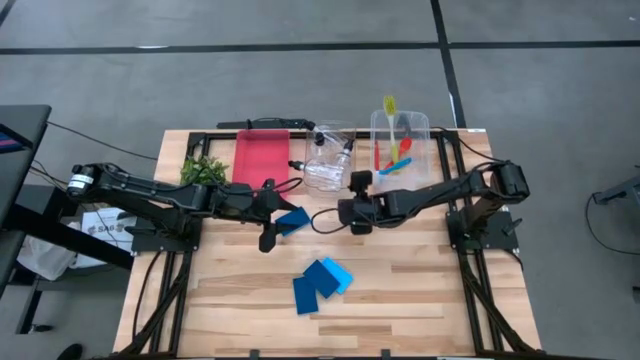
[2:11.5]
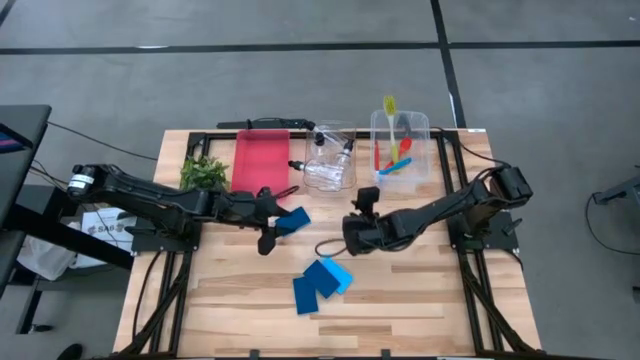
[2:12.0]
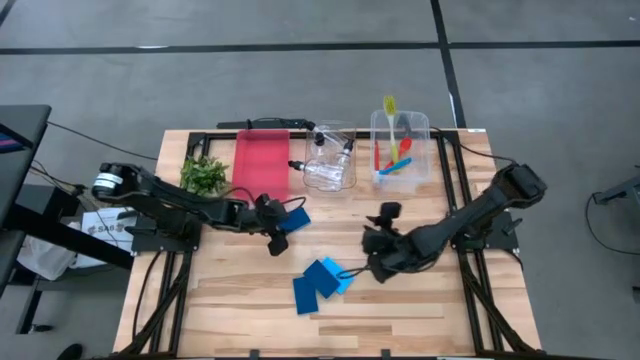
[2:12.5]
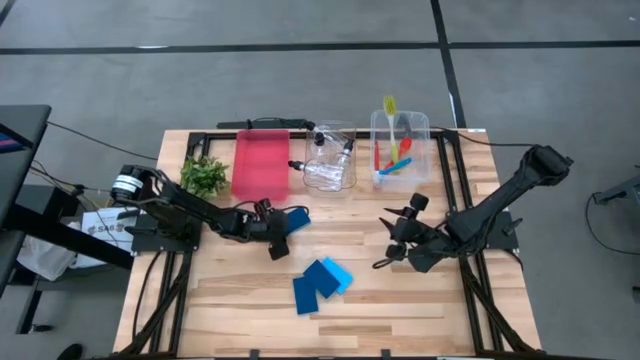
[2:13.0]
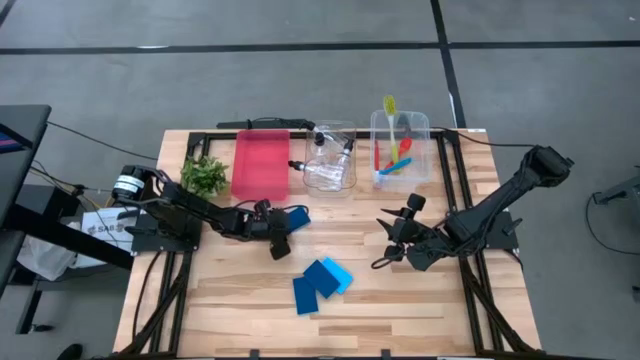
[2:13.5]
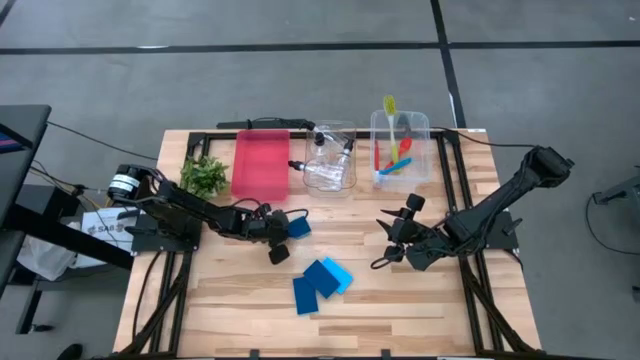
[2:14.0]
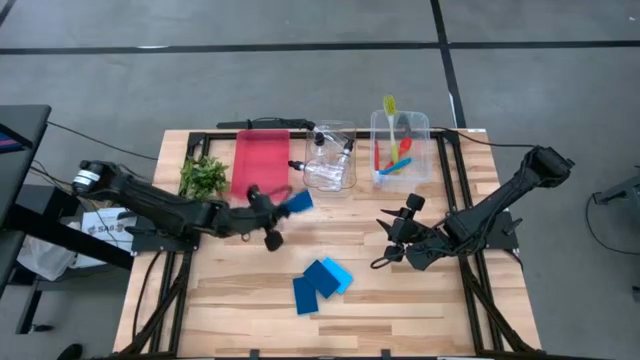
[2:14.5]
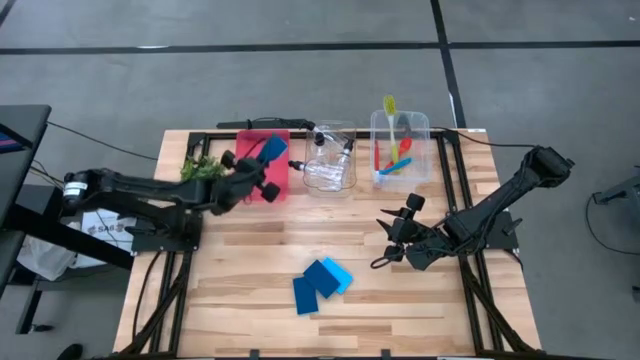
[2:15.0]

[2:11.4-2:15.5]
Task: Pick & Place Kitchen Sink Supplies
Put the blue sponge into the pink bin

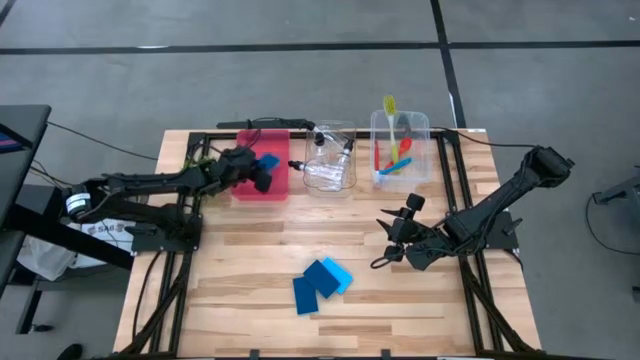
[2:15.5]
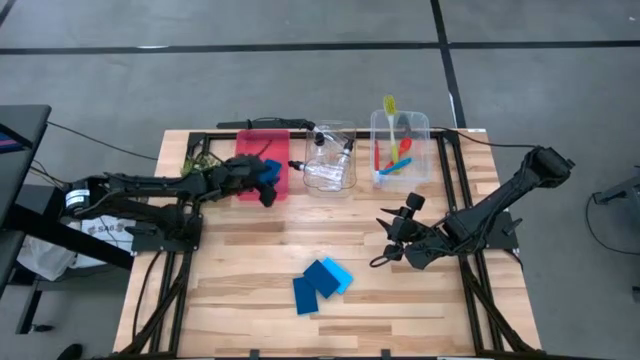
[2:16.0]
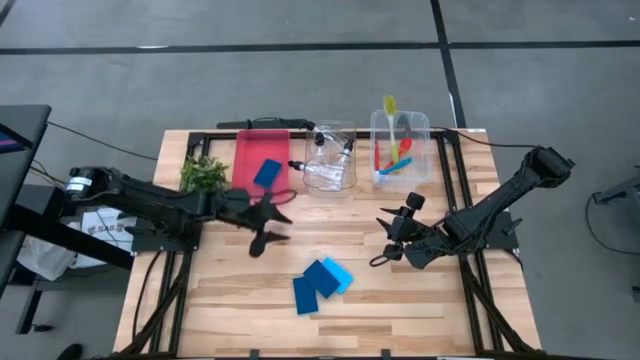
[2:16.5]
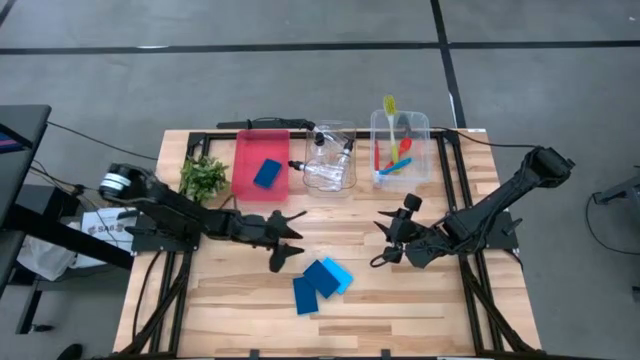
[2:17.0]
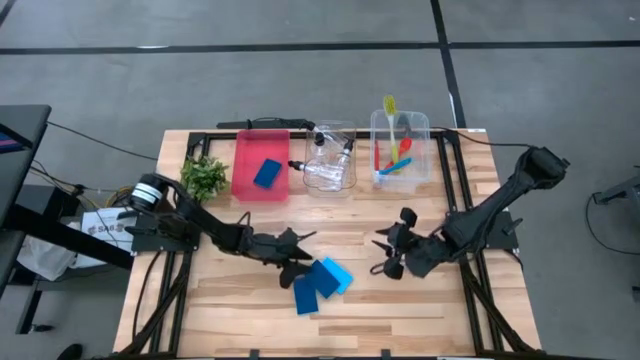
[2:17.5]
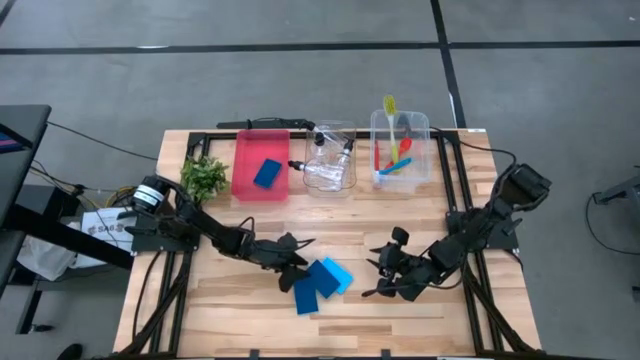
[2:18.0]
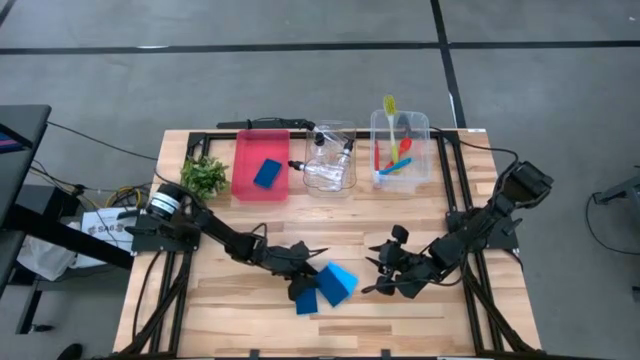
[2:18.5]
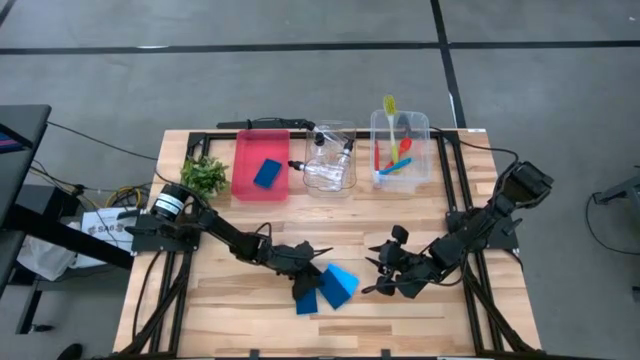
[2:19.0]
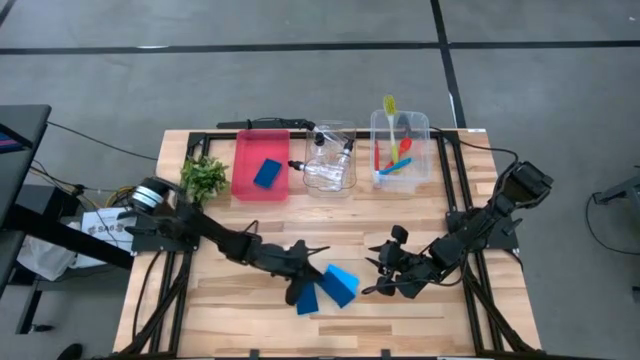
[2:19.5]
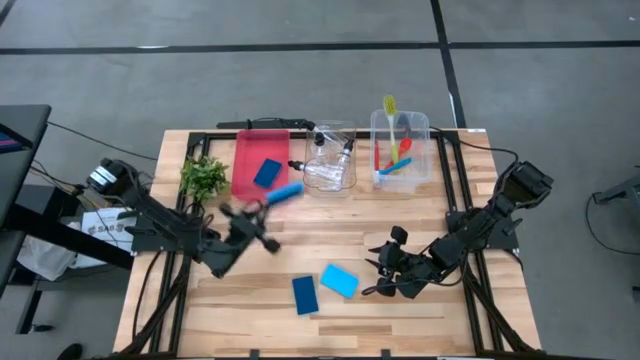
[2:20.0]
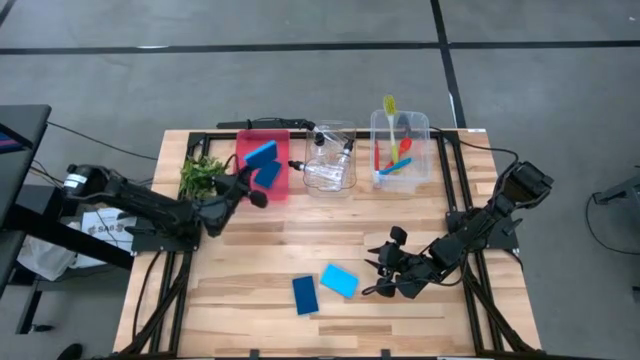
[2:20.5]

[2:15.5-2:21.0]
Put the blue sponge into the pink bin

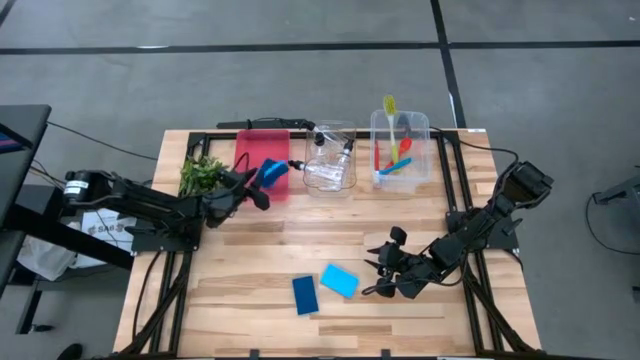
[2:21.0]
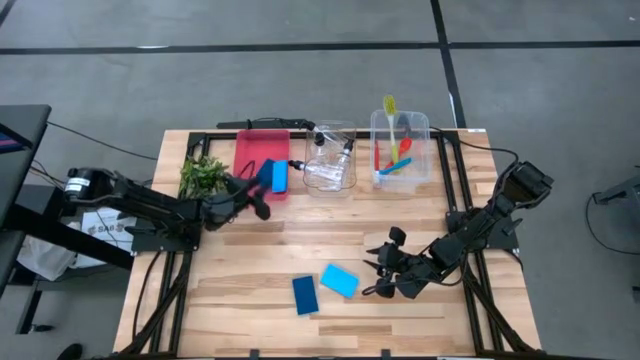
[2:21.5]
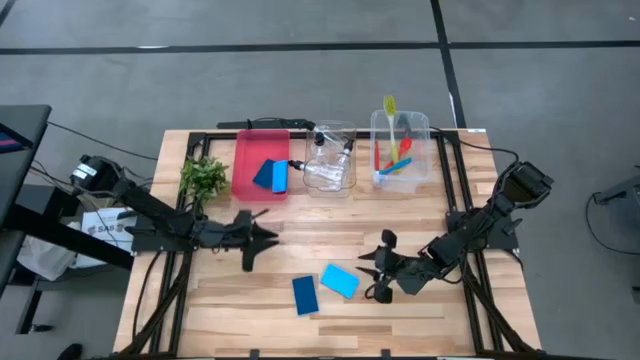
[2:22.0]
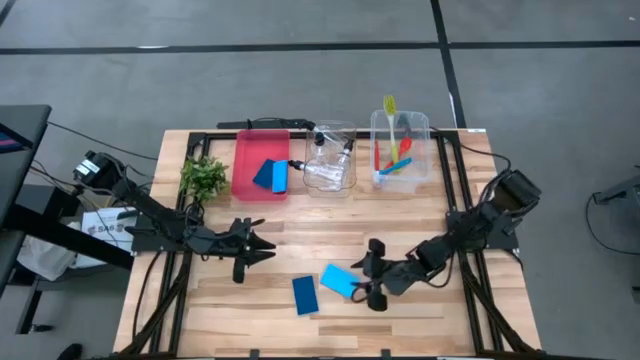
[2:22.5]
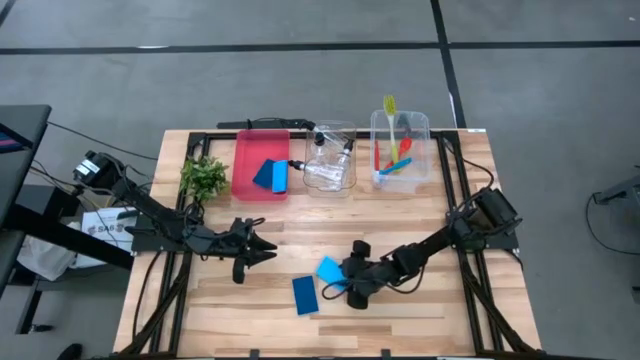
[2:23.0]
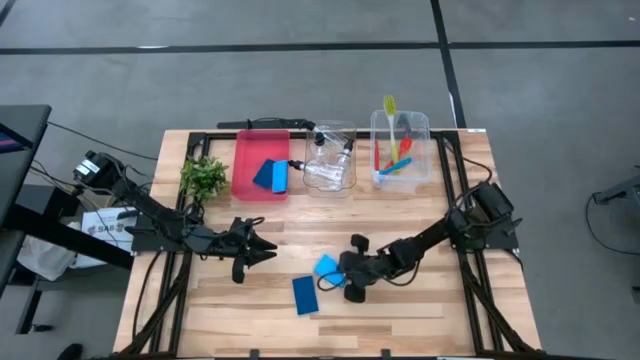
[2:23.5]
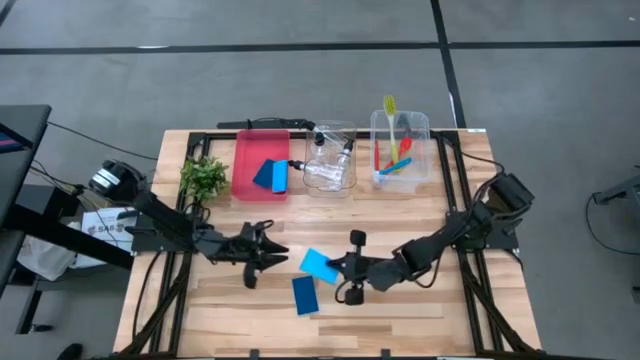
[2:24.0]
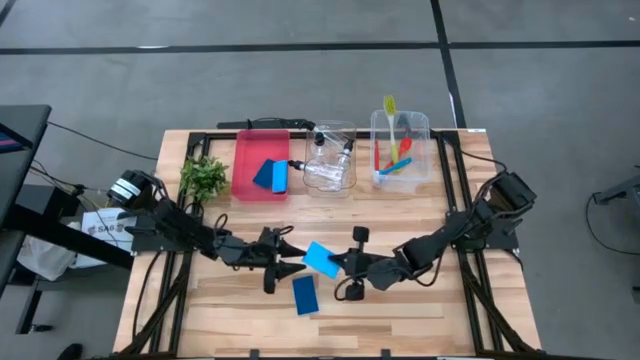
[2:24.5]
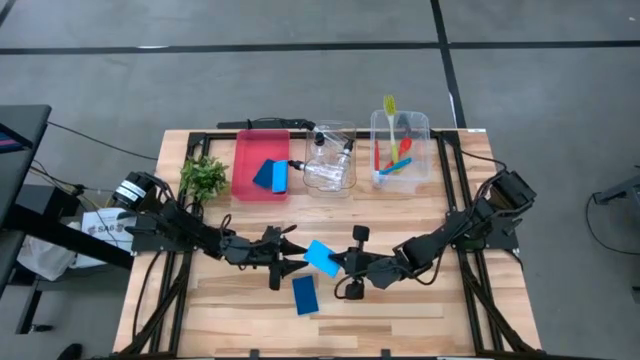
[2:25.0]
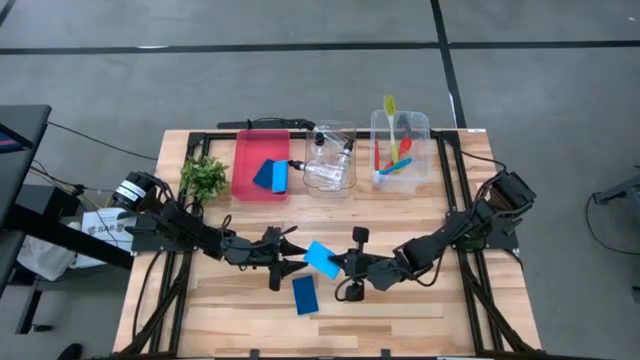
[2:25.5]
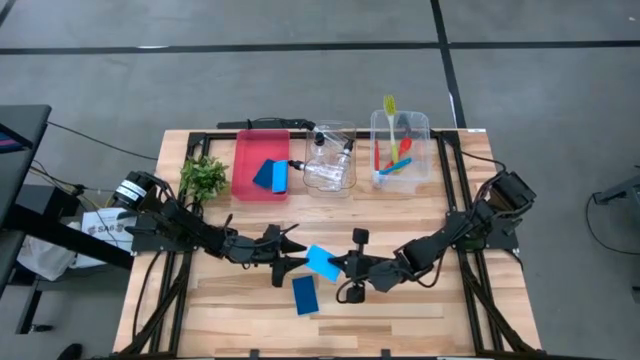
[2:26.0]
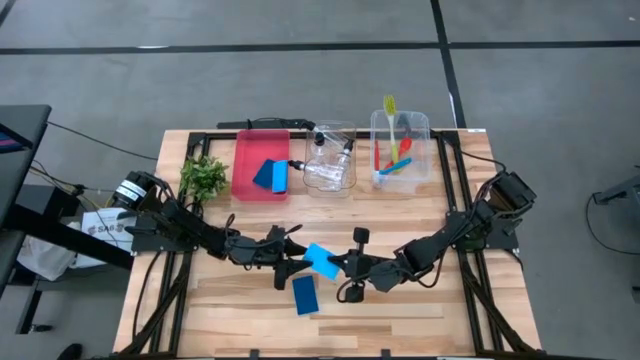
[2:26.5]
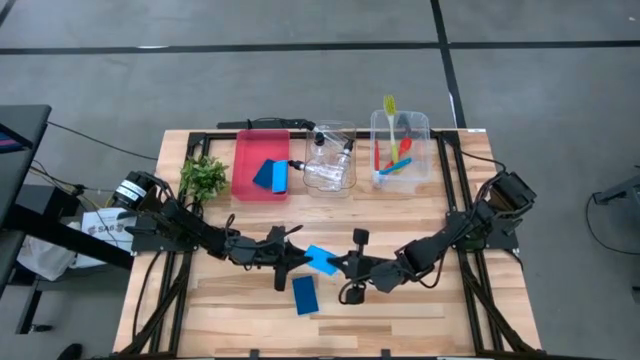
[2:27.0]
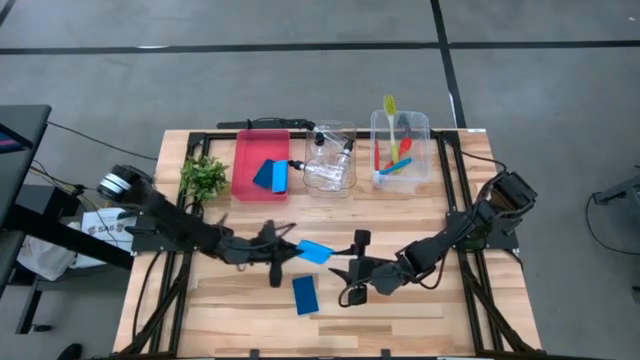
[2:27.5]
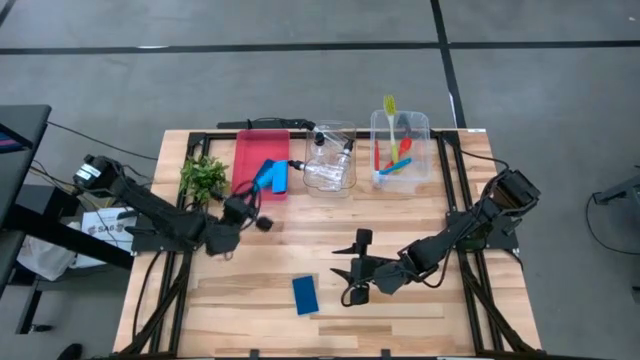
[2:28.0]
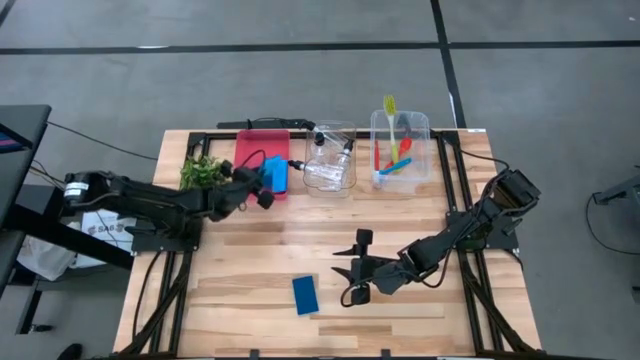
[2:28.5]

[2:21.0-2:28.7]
Put the blue sponge into the pink bin

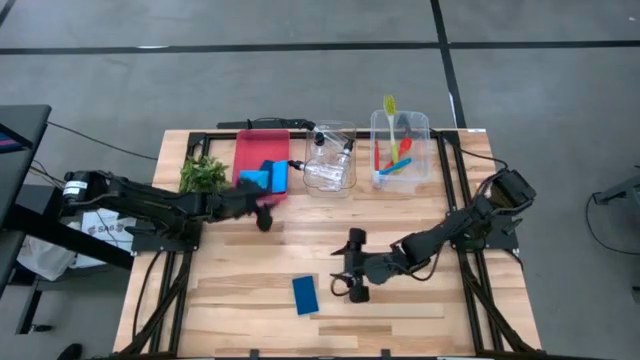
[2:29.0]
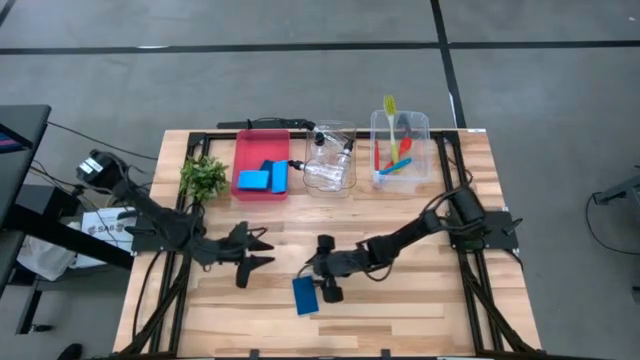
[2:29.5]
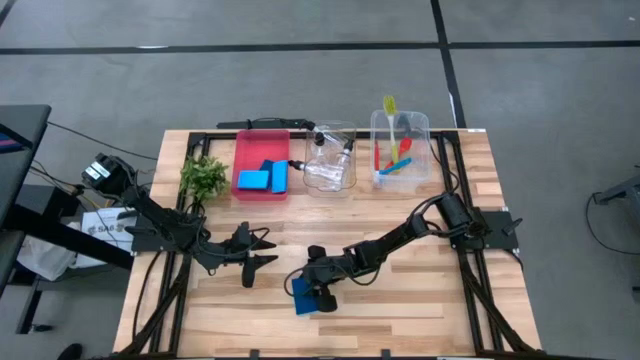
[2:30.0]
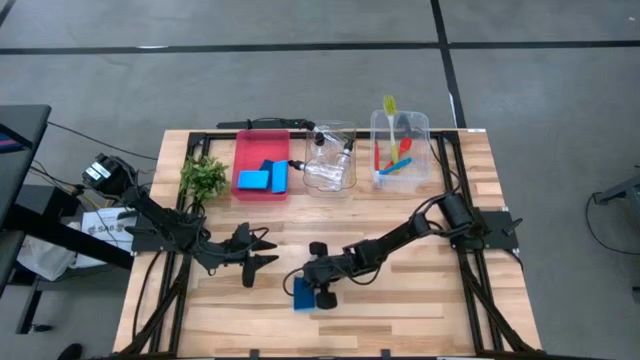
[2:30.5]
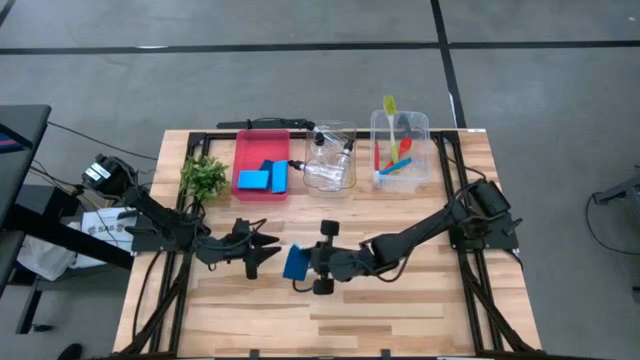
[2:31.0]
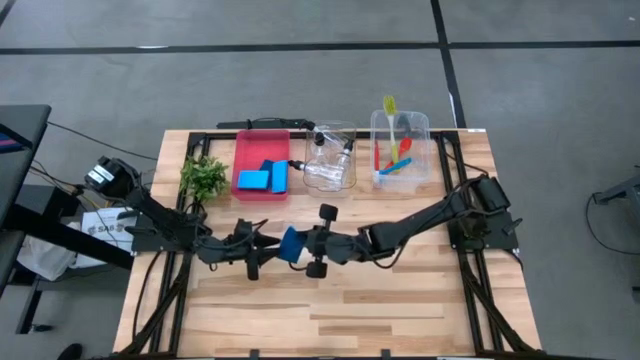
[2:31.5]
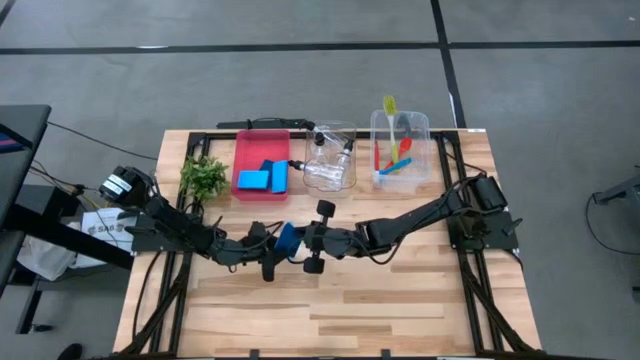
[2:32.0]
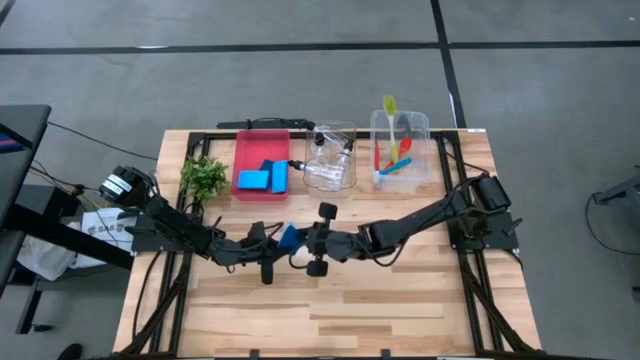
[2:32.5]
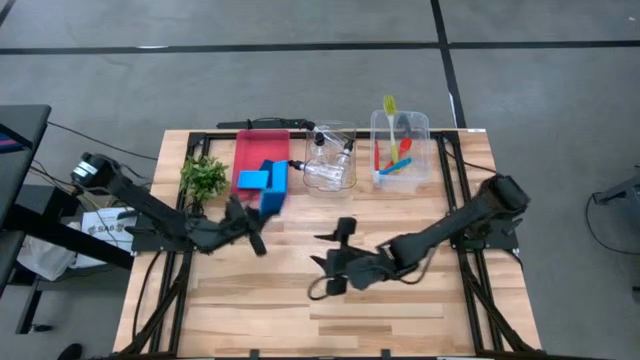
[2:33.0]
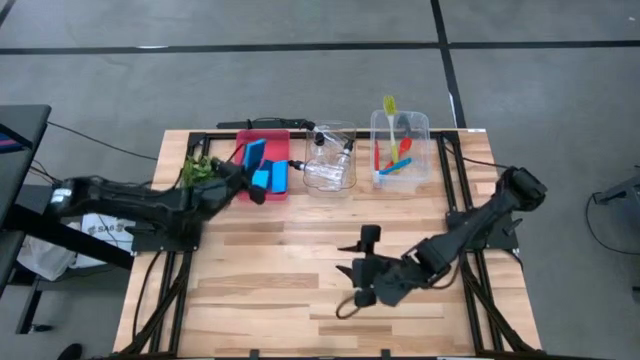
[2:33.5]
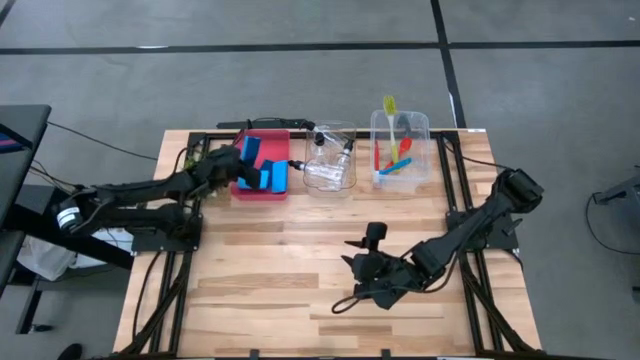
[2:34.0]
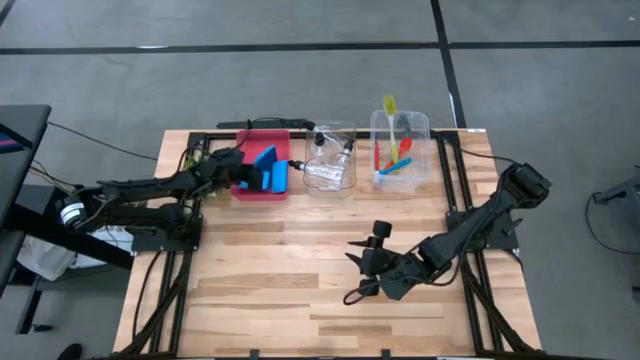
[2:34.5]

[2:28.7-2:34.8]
Put the blue sponge into the pink bin
